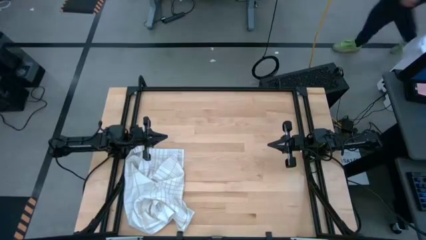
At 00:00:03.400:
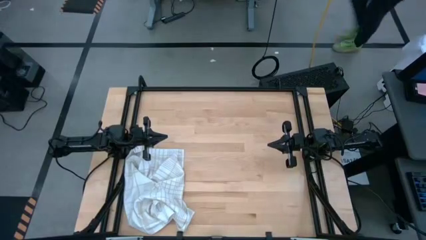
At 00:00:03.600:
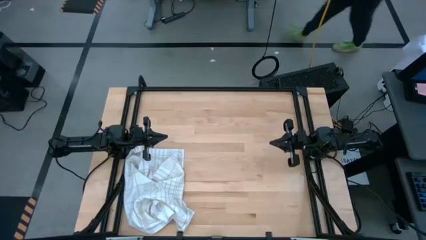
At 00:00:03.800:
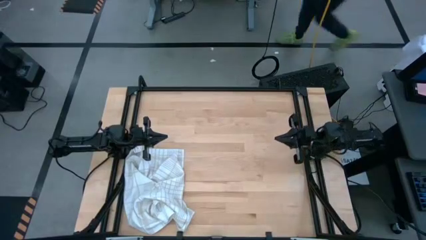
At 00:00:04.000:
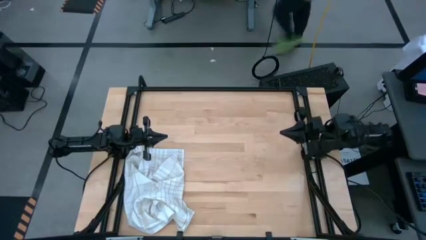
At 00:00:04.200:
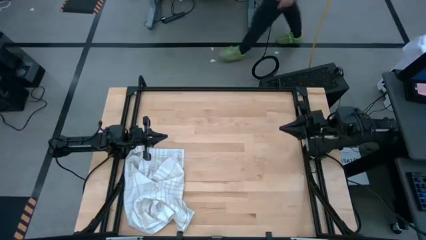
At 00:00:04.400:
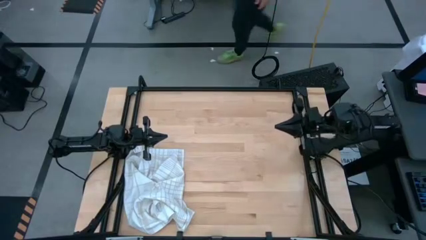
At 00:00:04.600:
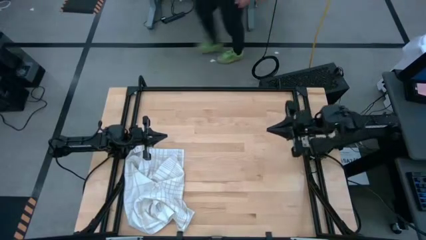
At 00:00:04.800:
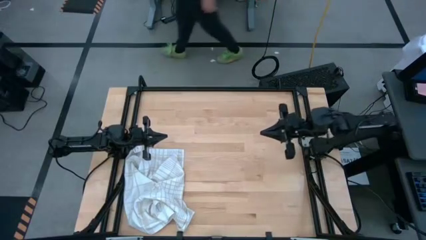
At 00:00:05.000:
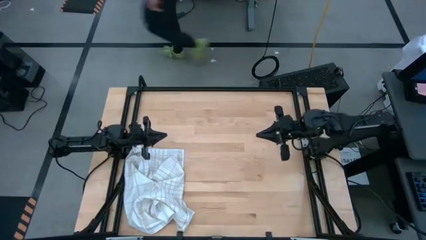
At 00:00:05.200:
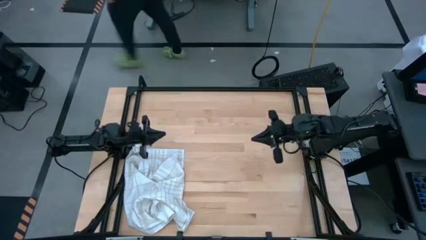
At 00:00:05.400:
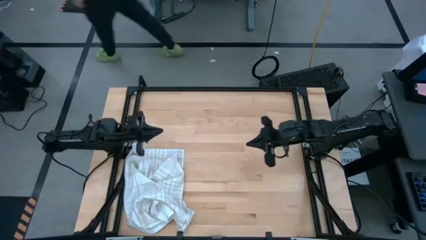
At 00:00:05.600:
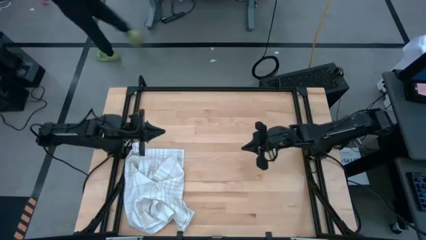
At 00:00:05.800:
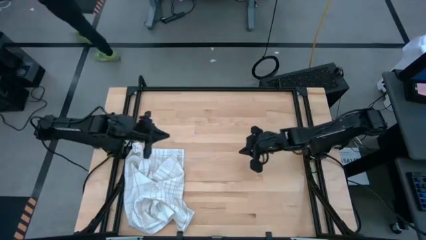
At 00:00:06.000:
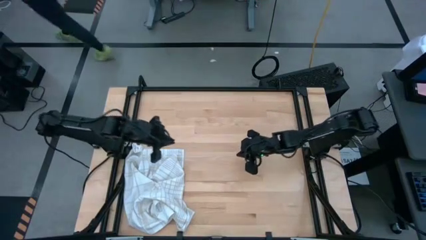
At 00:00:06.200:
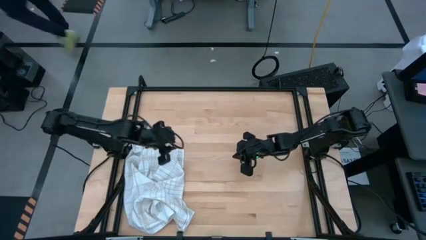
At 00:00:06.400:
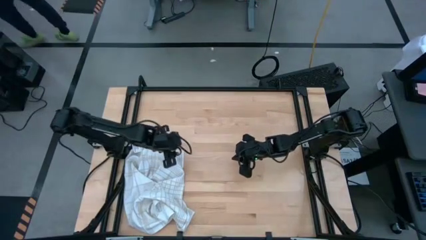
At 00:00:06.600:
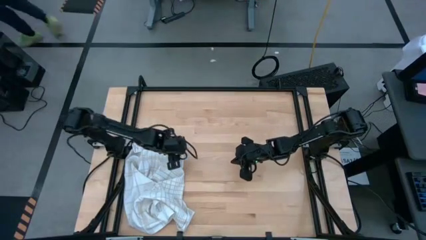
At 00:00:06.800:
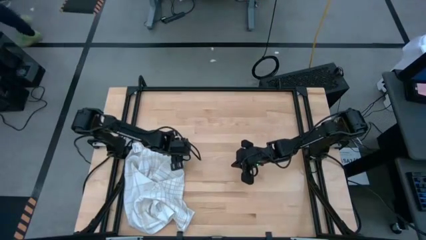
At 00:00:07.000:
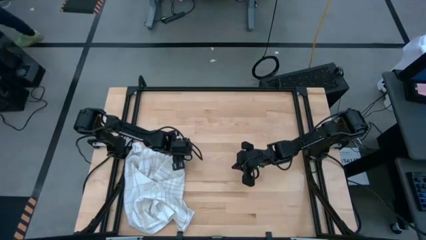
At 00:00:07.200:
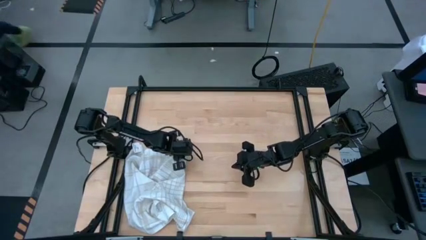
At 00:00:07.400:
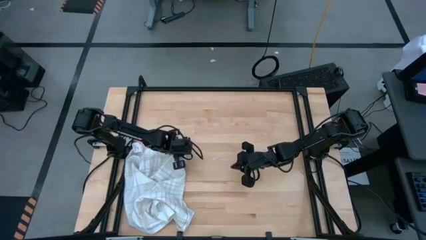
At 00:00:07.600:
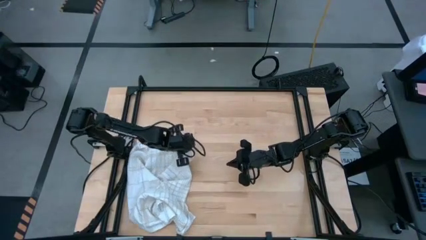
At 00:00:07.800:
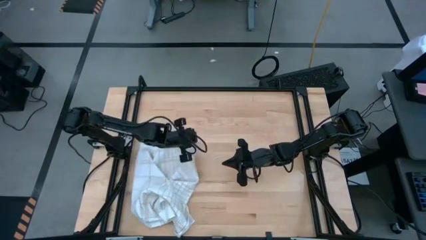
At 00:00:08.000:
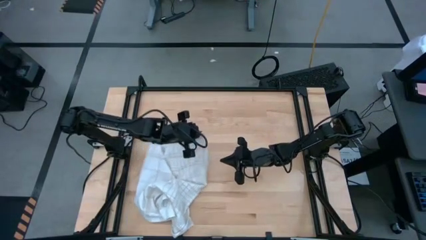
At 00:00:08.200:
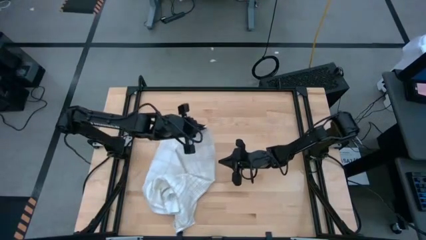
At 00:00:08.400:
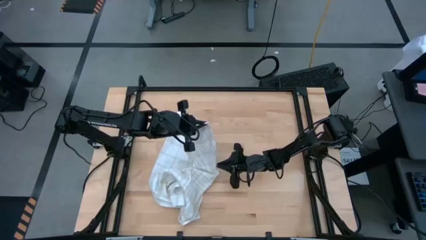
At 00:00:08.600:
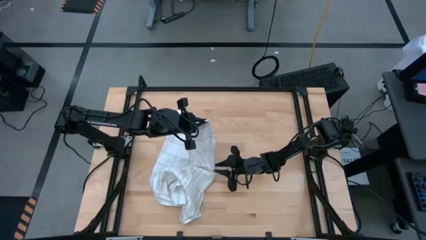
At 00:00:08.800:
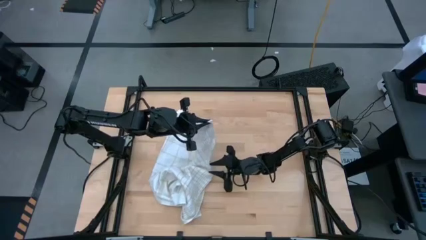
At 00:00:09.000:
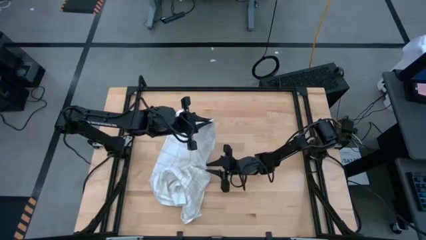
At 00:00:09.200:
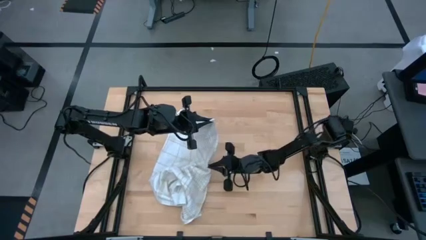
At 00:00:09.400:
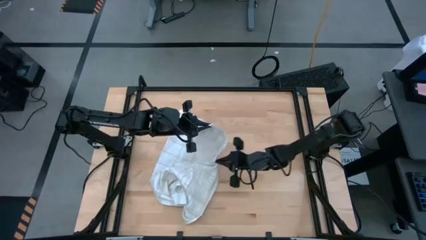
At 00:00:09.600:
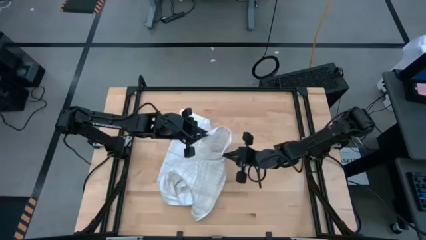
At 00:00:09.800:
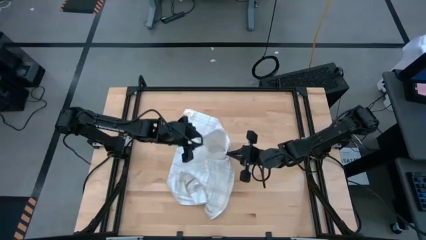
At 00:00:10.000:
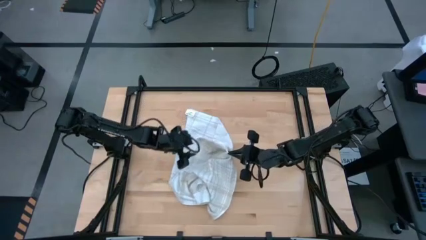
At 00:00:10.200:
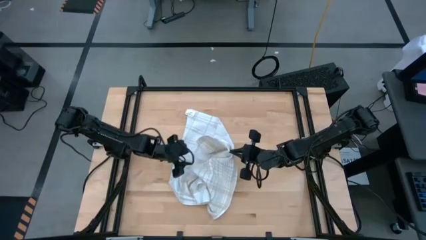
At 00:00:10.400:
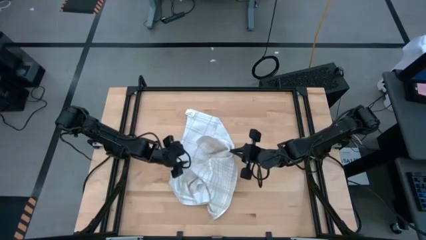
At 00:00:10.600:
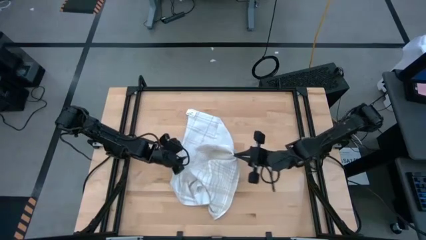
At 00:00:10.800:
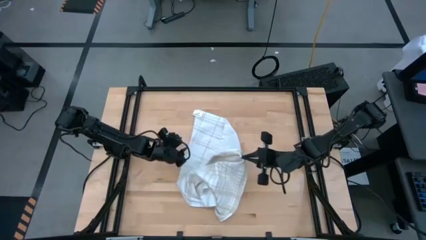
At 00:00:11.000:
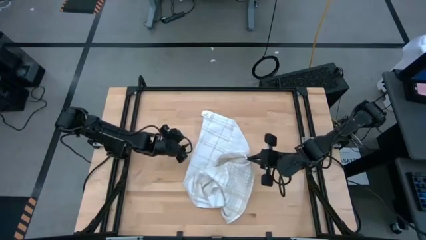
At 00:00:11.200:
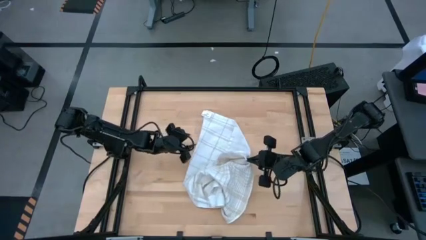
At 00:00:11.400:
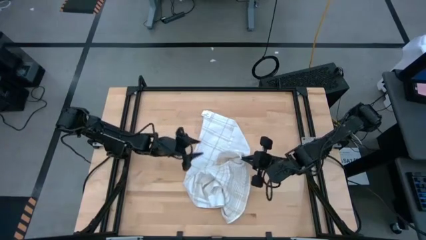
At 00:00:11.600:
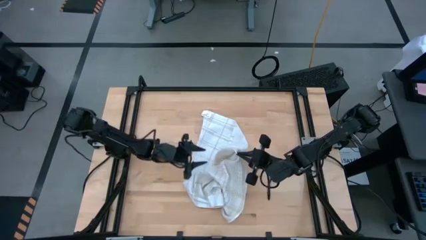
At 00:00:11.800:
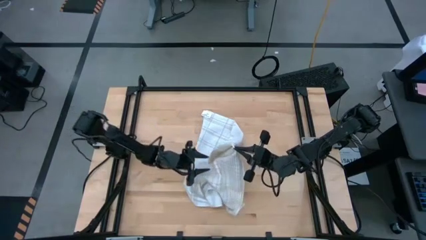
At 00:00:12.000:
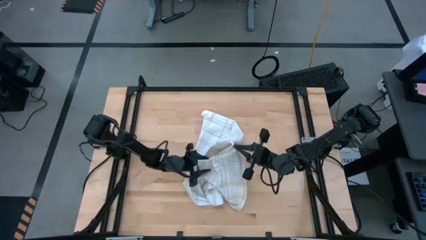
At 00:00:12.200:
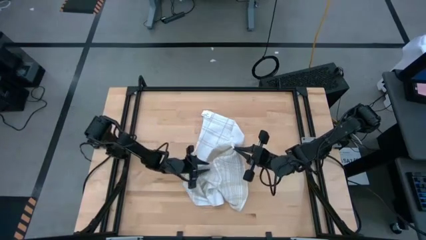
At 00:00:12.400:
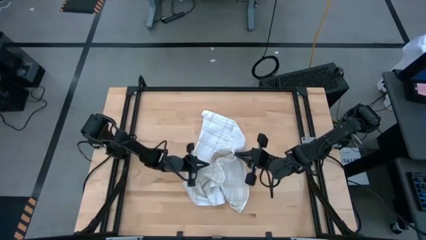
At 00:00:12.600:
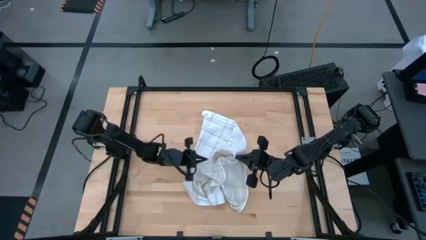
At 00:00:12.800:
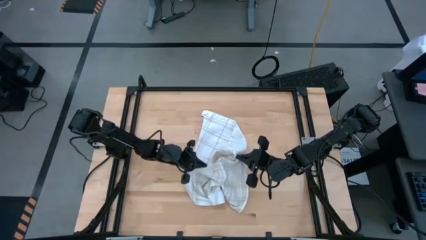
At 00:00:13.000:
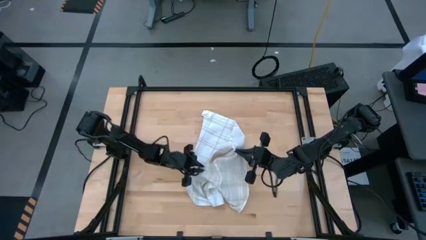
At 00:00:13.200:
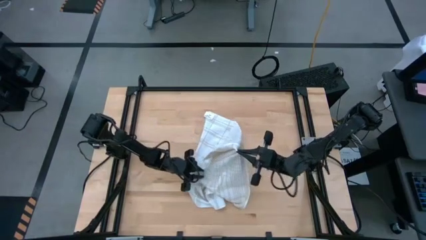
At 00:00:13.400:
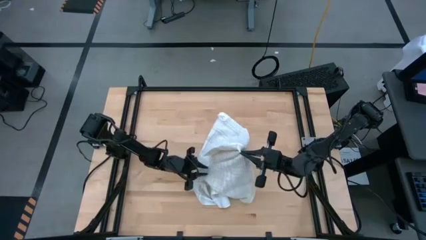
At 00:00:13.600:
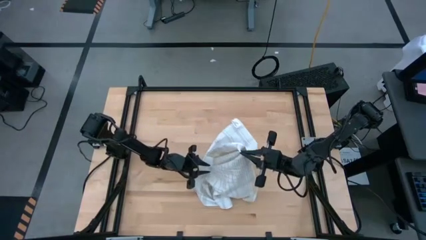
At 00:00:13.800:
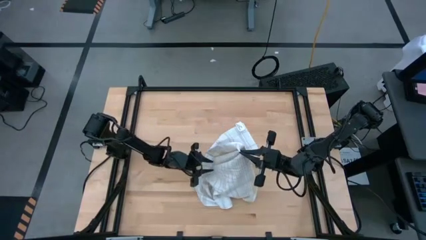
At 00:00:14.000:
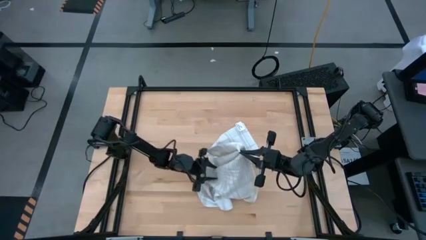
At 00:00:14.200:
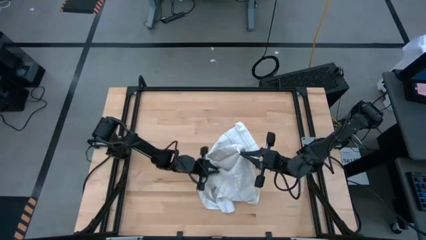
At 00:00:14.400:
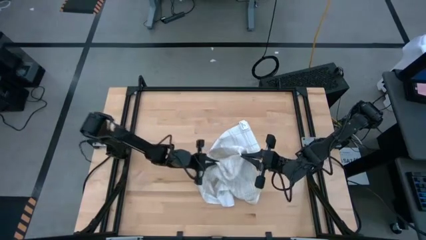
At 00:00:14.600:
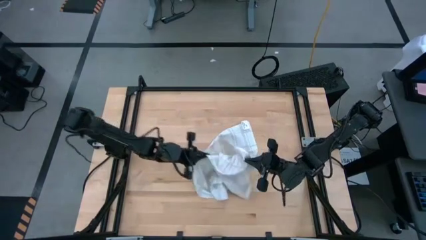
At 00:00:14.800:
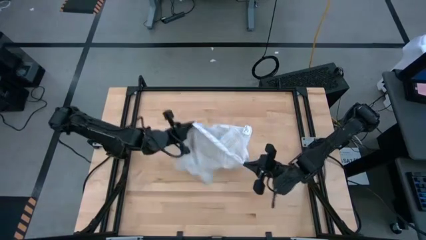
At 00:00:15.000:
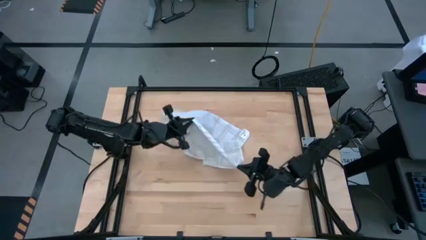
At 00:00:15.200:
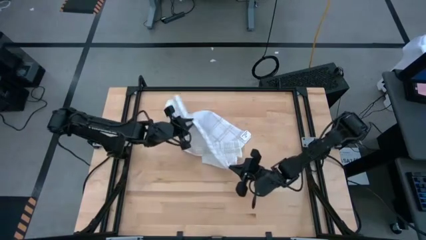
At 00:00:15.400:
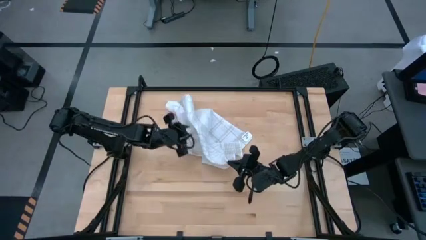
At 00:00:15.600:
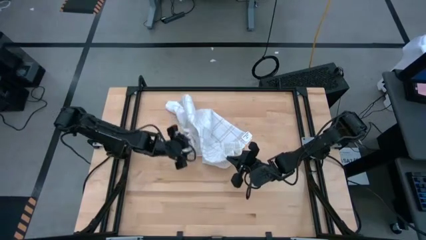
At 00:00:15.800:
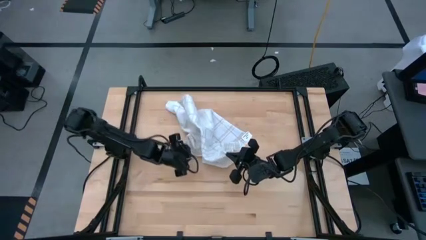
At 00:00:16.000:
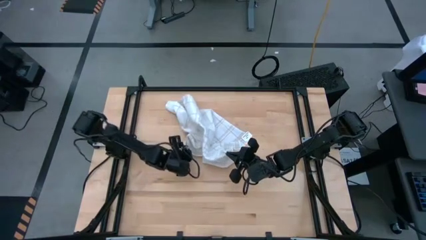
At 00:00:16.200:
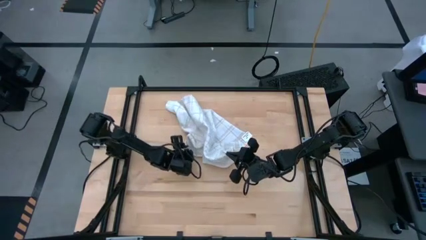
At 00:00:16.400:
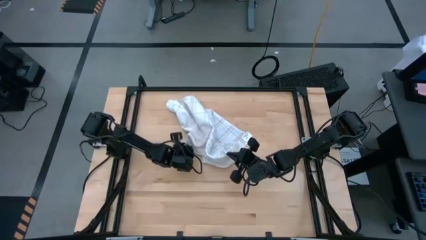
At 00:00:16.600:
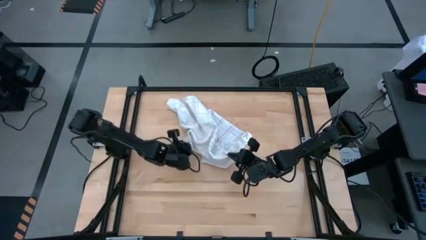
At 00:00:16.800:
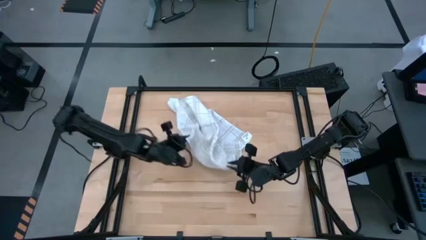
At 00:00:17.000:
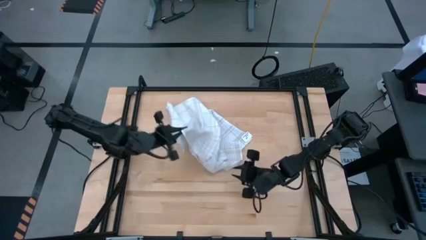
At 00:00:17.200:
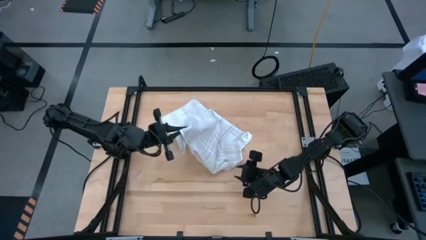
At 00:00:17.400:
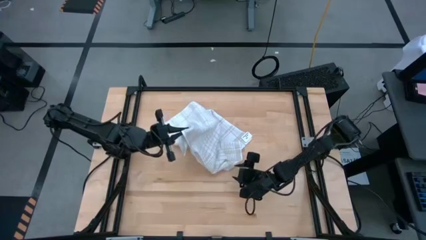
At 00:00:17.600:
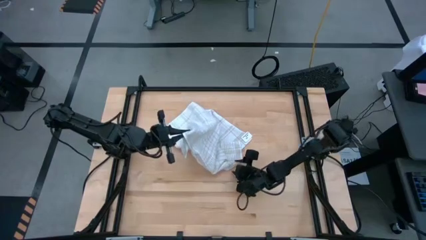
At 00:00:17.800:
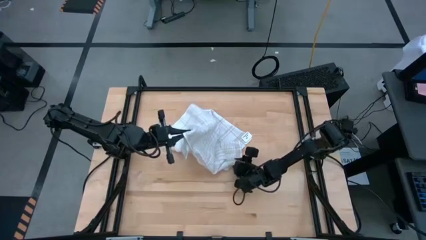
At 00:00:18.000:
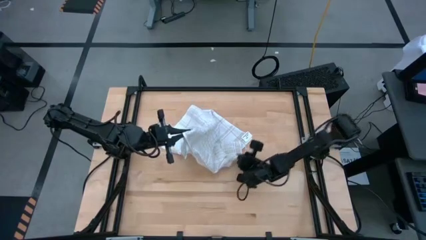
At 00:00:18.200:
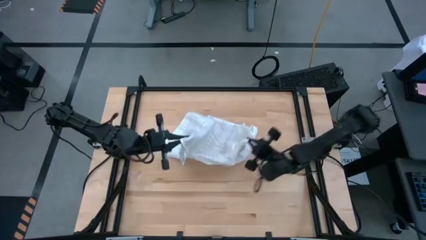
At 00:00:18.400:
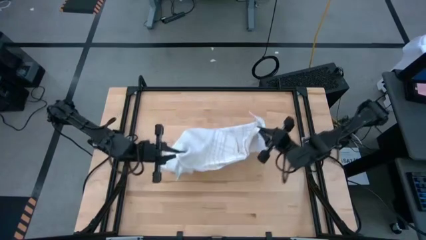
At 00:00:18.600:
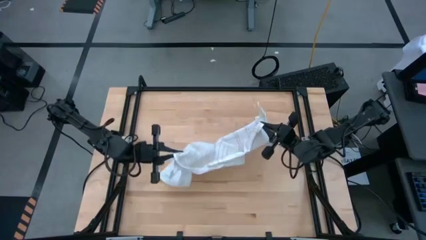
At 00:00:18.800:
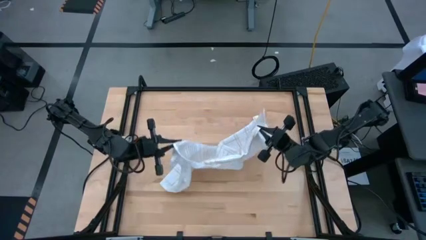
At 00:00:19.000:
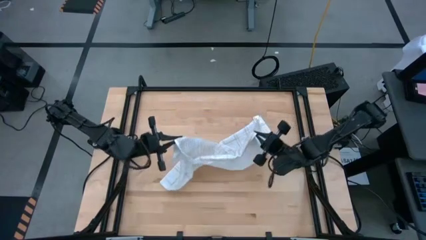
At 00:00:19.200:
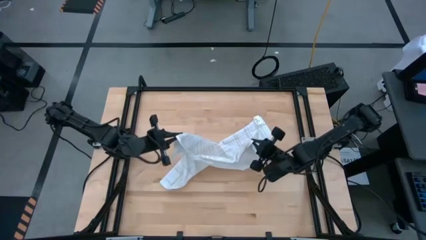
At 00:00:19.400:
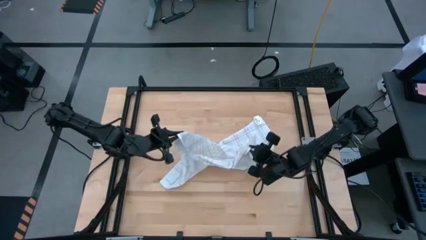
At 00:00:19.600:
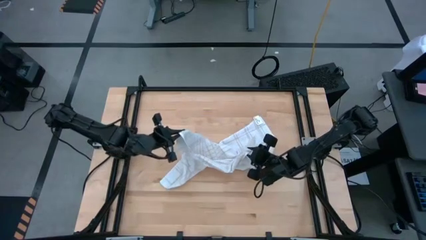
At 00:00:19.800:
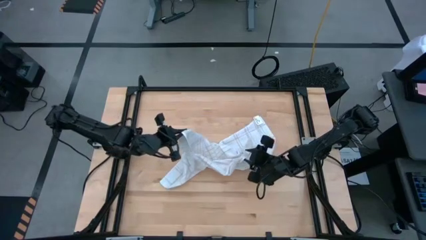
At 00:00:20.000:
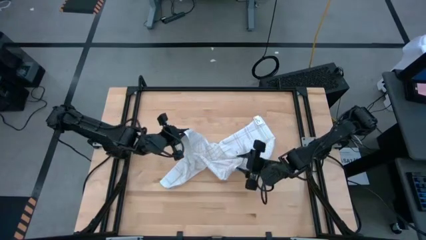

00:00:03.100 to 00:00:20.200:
Task: Roll towel
Fold the white towel
